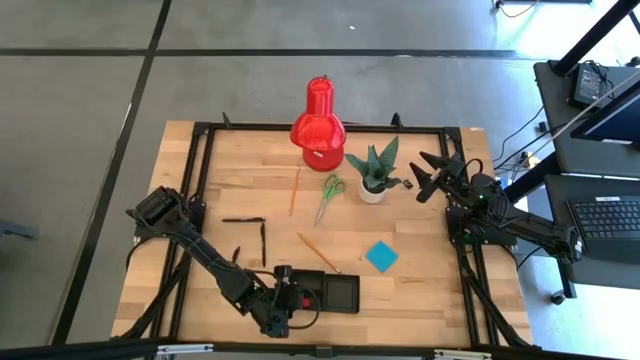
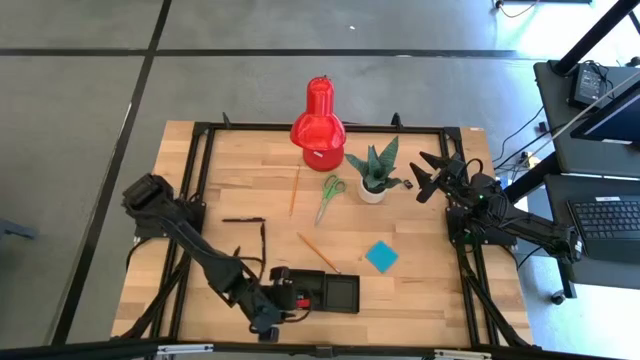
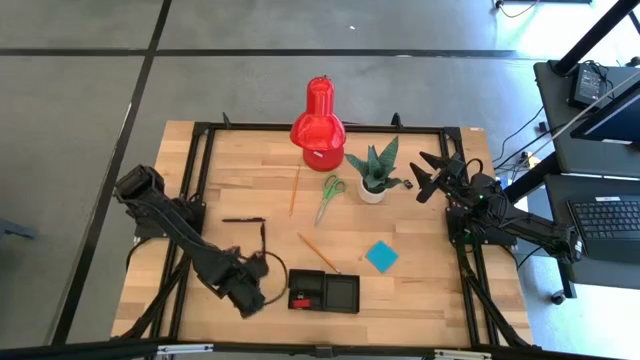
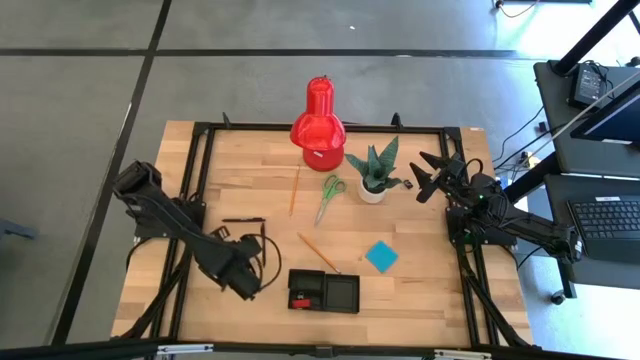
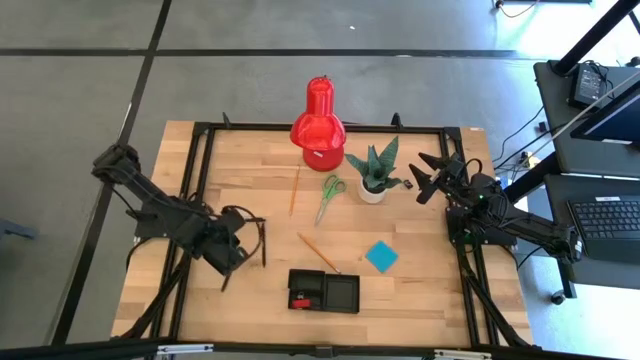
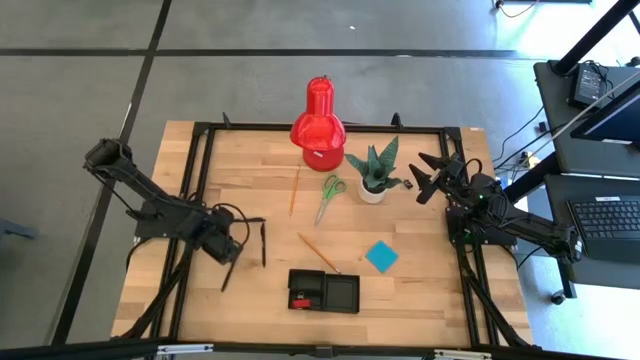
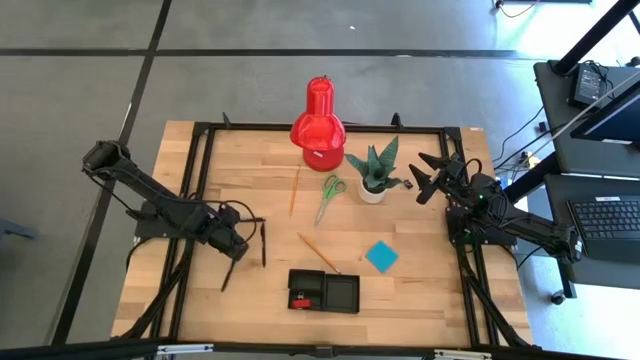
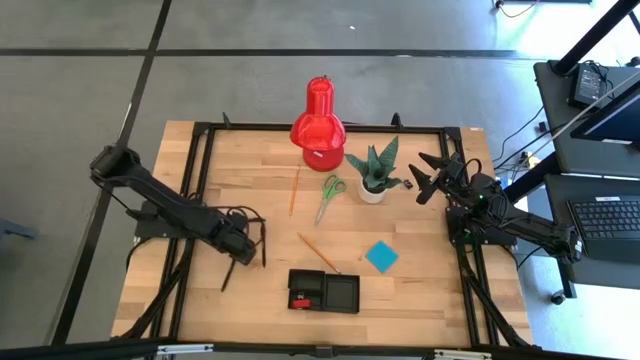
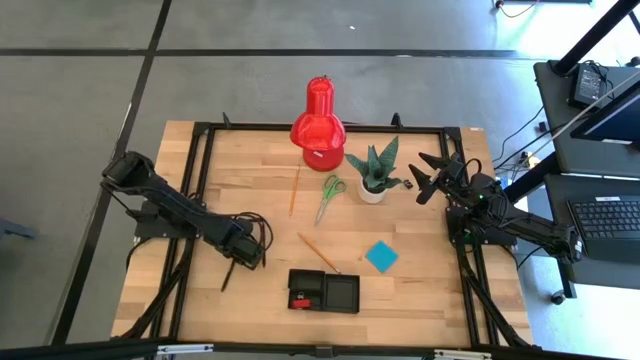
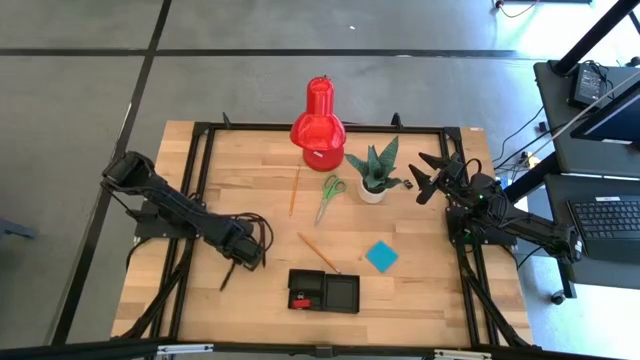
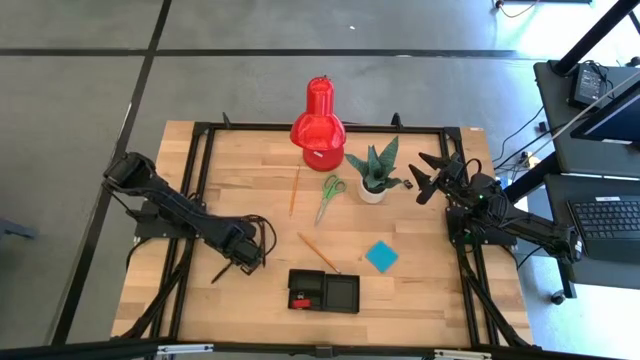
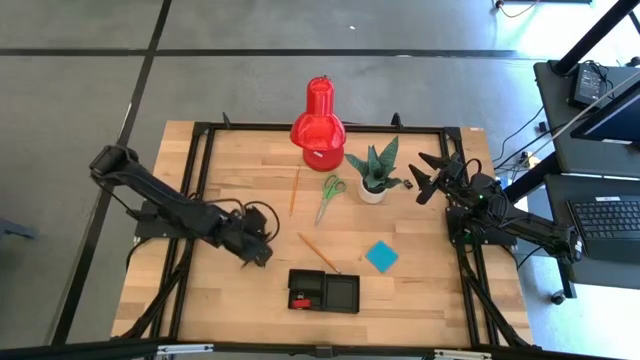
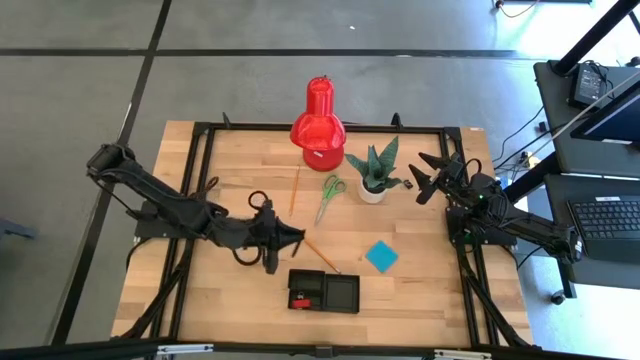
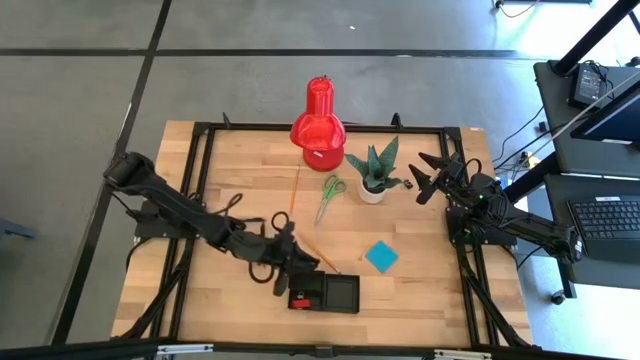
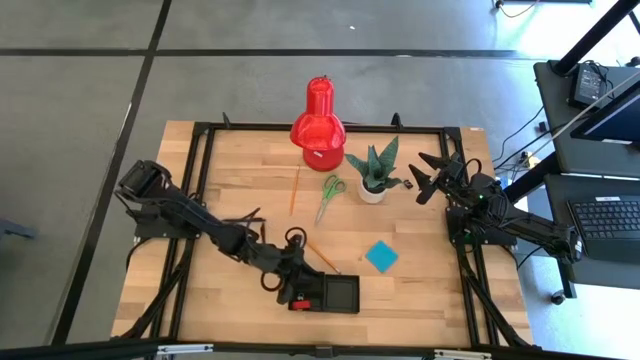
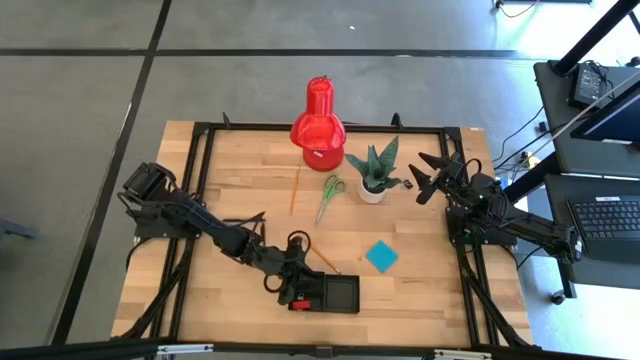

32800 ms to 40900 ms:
Task: Pick and place office supplies into organizer
Put the bottom left black pen into the desk organizer

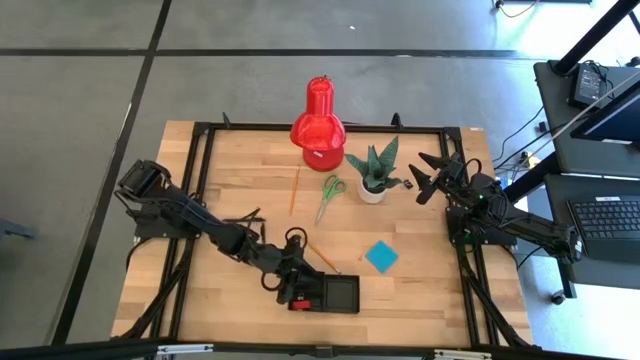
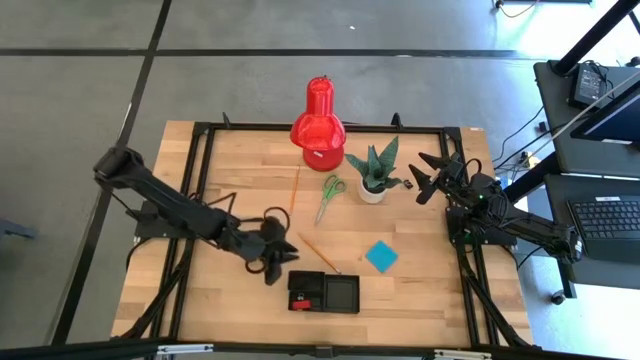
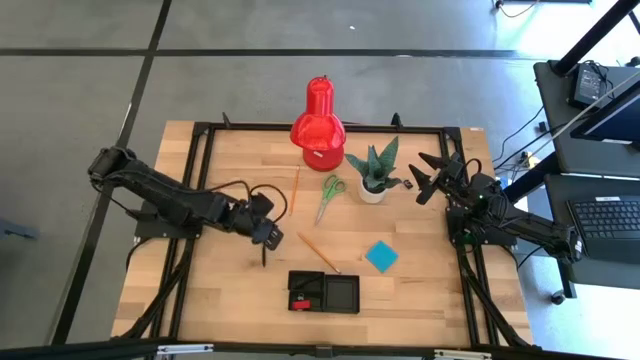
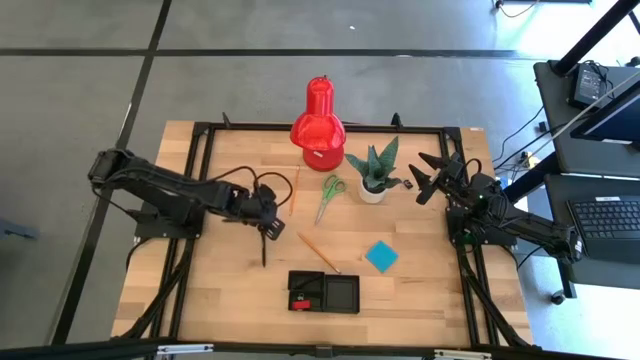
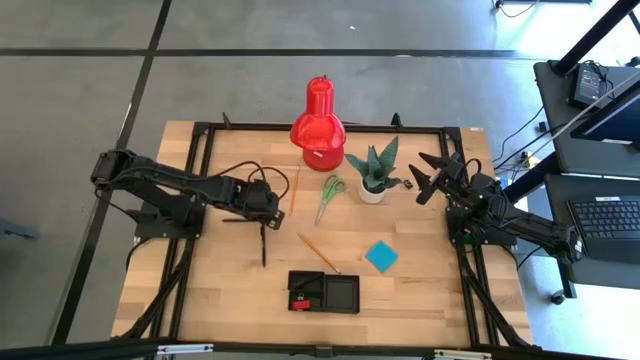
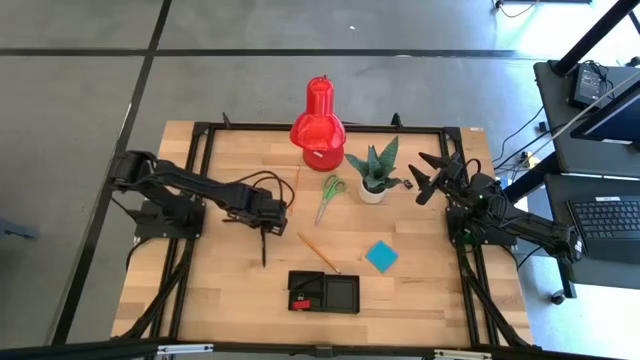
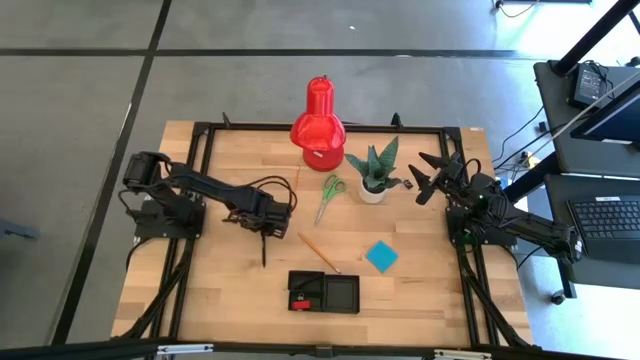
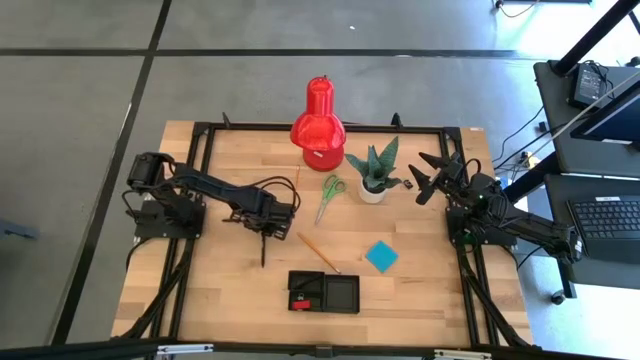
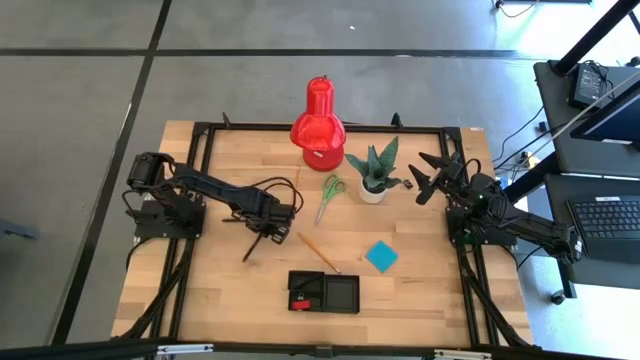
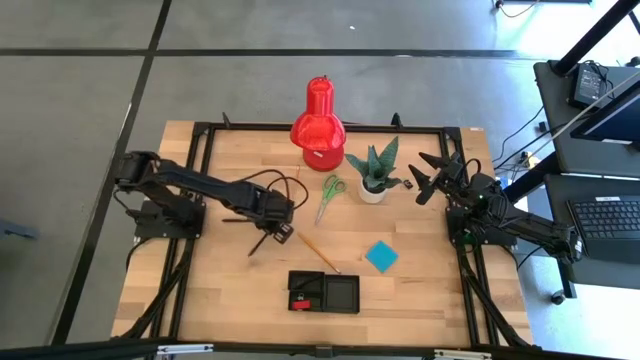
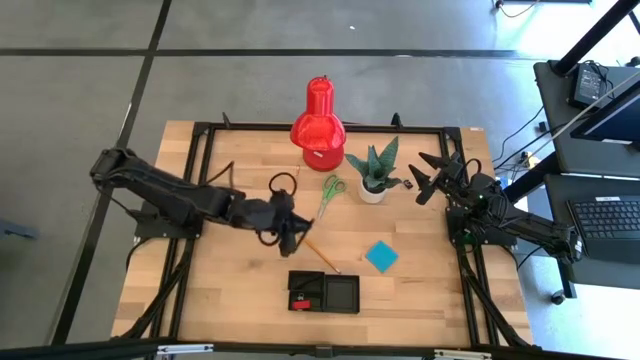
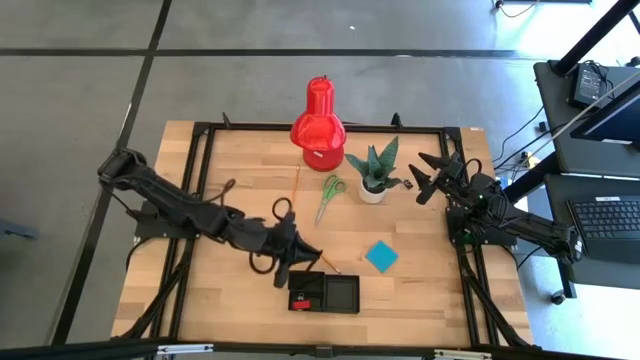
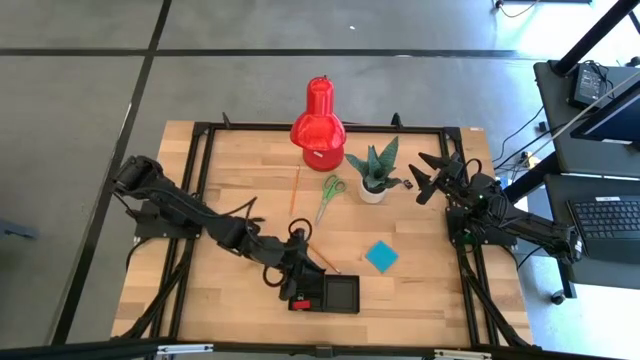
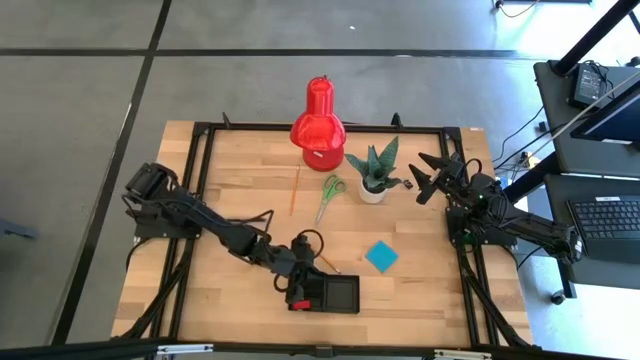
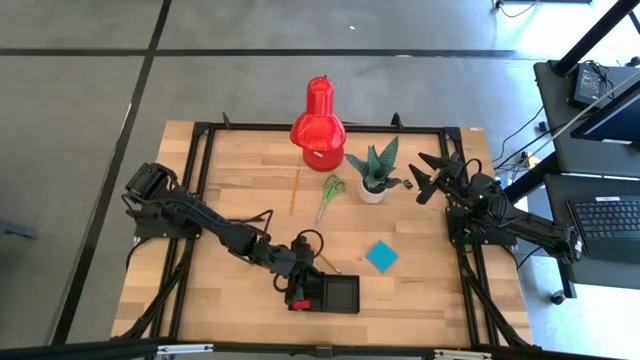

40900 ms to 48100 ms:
Put the bottom black pen into the desk organizer

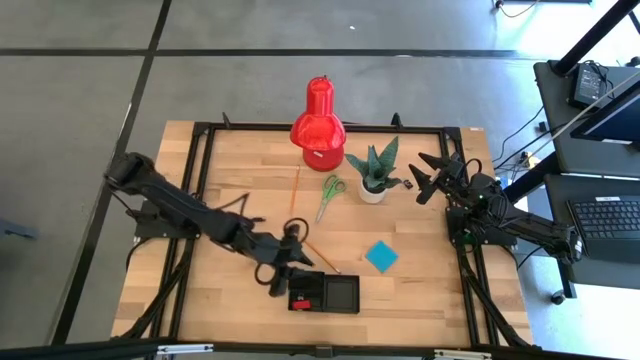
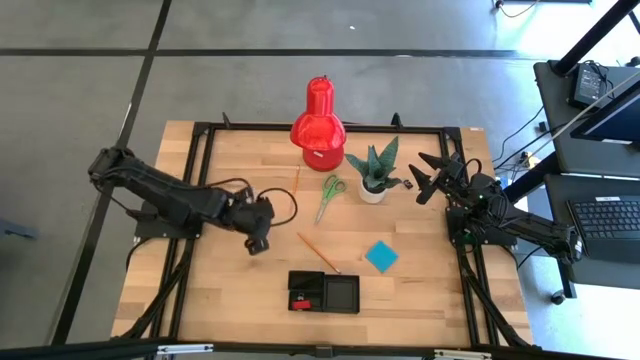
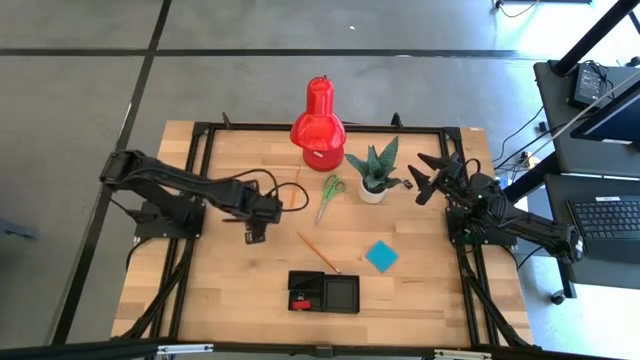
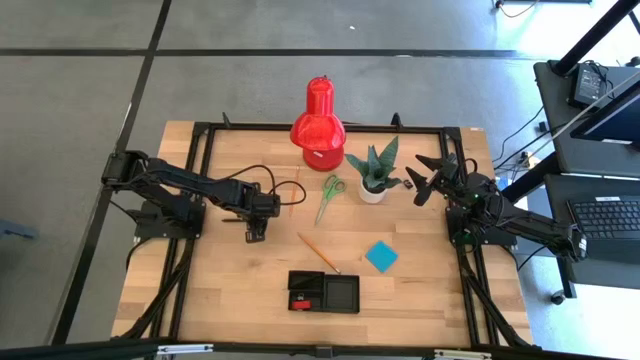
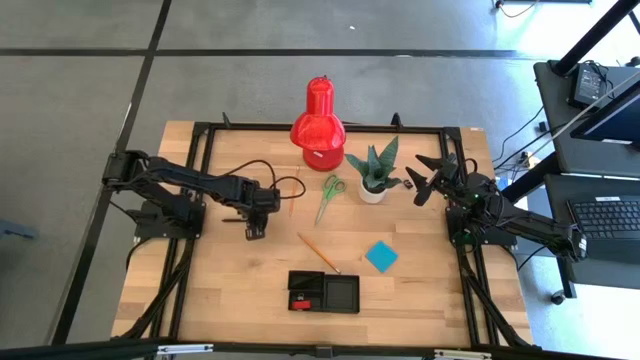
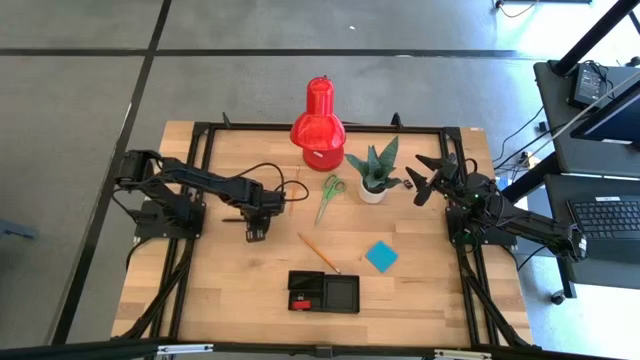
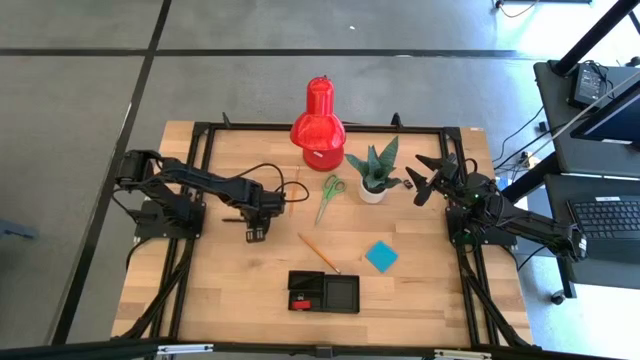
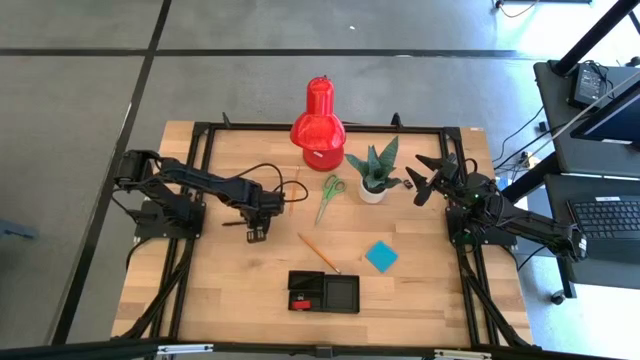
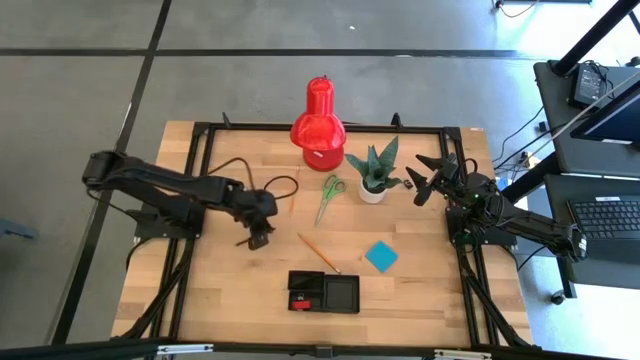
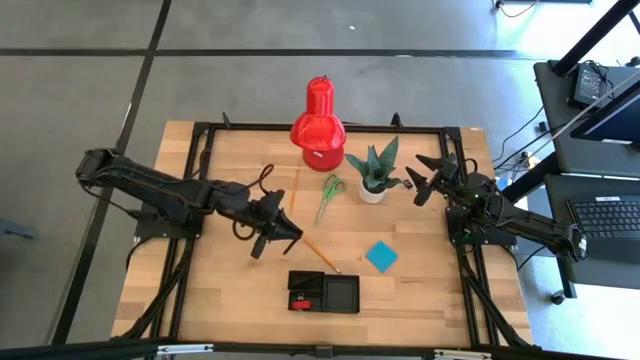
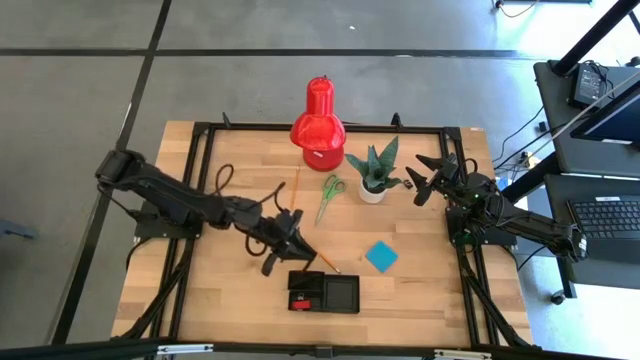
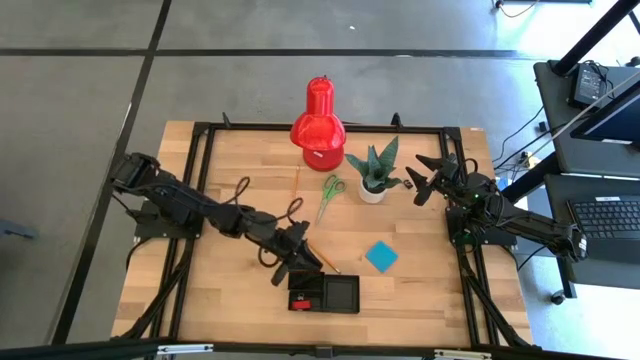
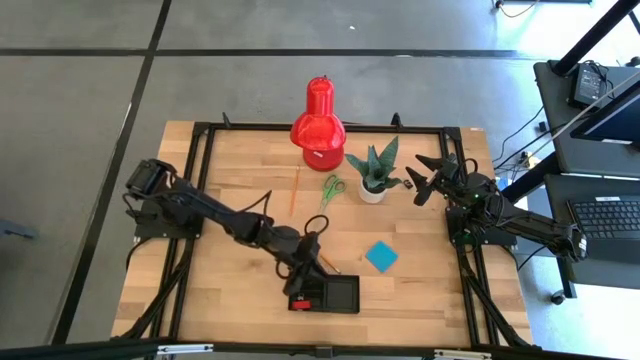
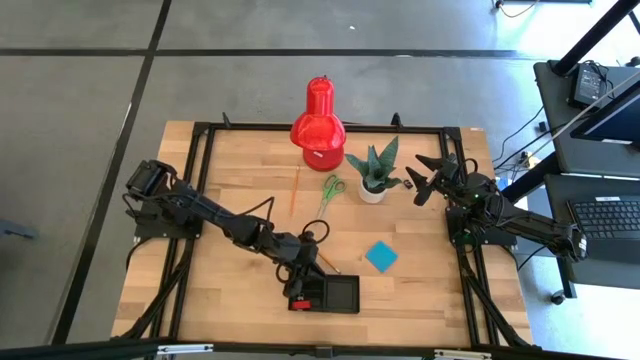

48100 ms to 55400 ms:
Put the black pen into the desk organizer

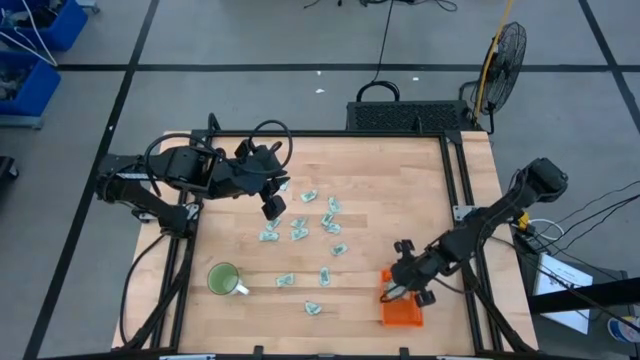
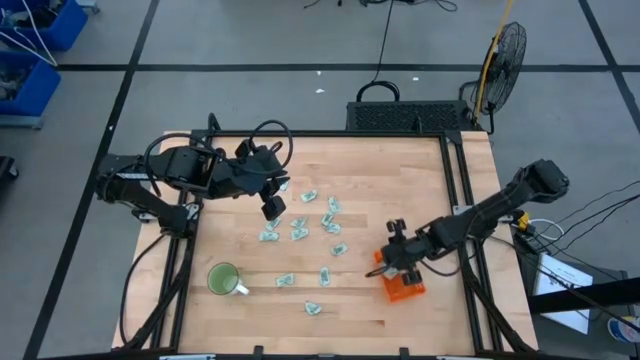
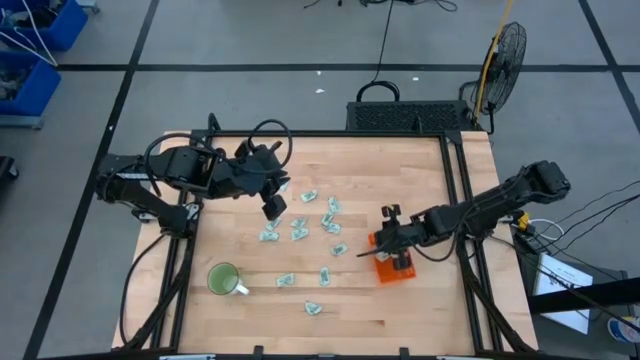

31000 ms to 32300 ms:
Task: Pick and place Stevia / Truvia into bins
Adjust the orange basket
